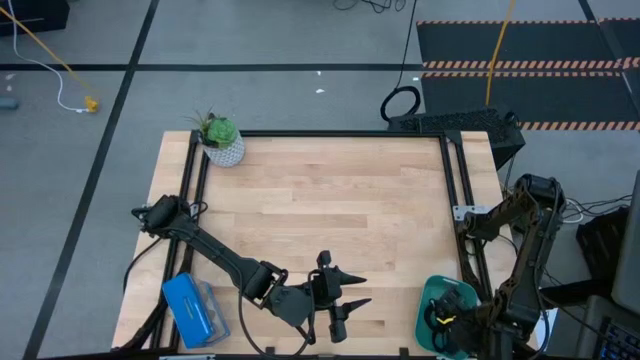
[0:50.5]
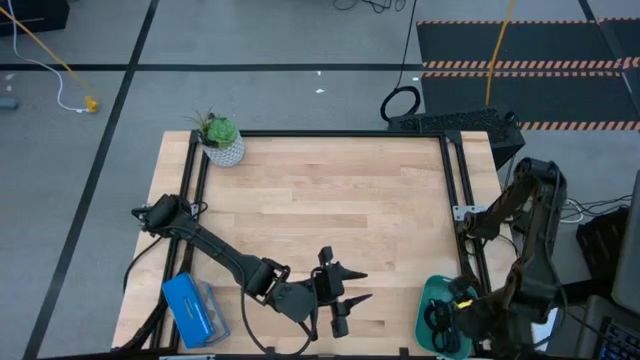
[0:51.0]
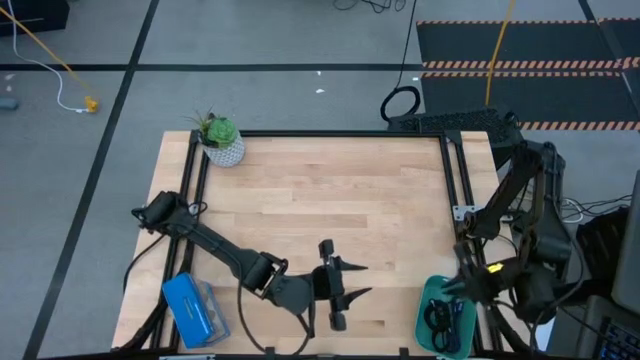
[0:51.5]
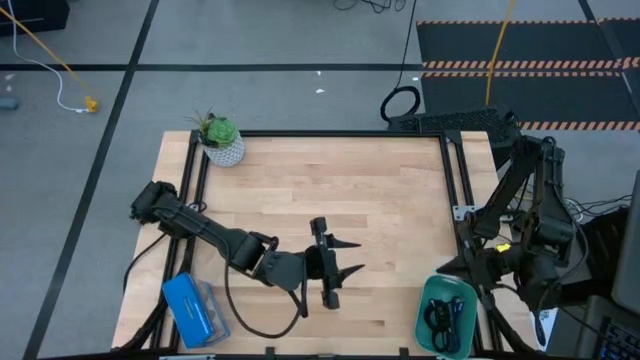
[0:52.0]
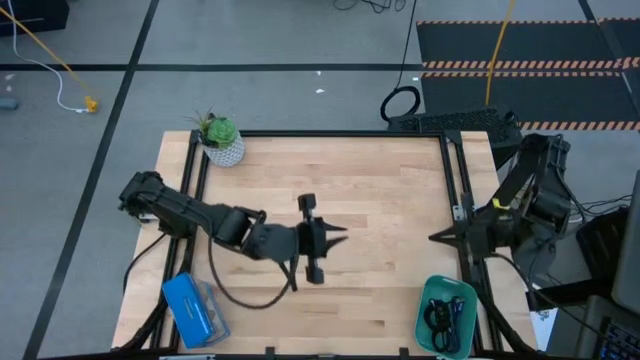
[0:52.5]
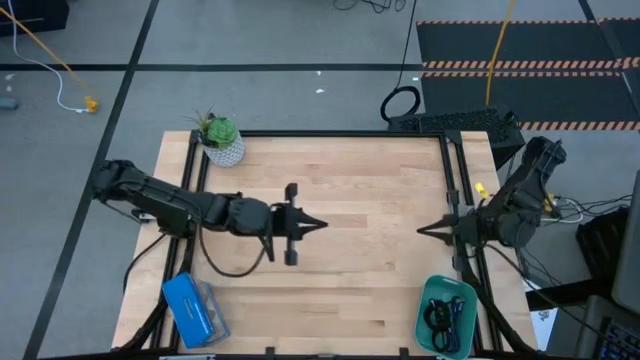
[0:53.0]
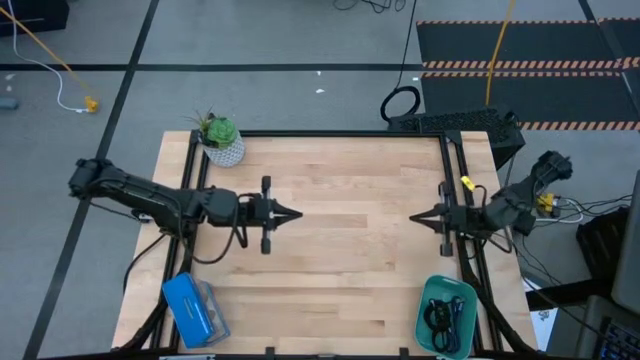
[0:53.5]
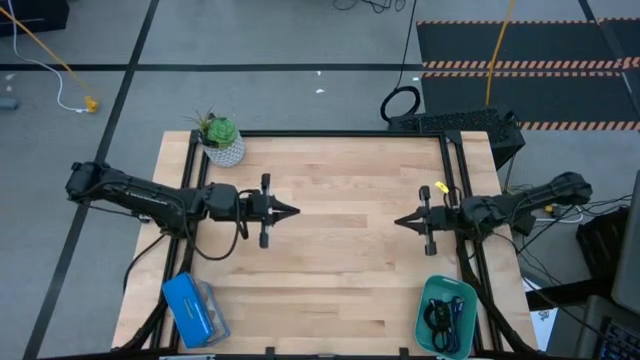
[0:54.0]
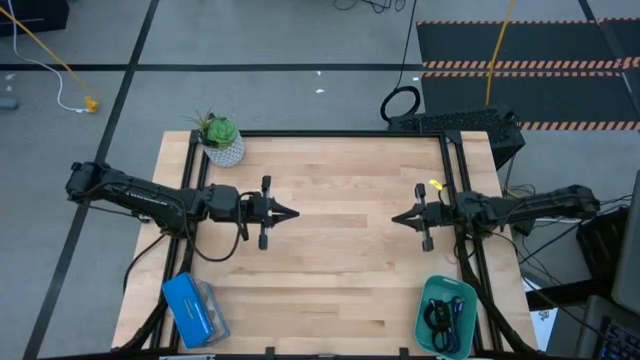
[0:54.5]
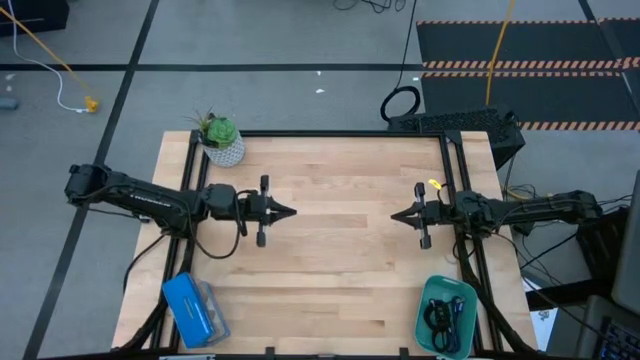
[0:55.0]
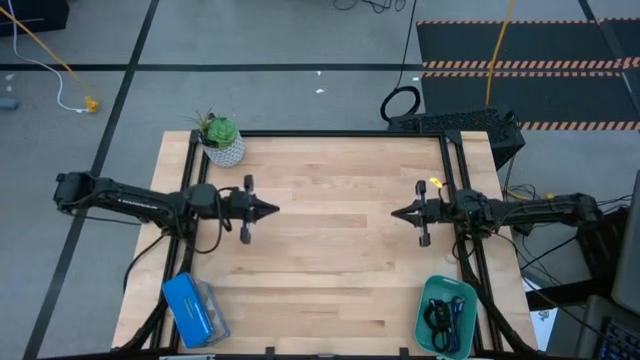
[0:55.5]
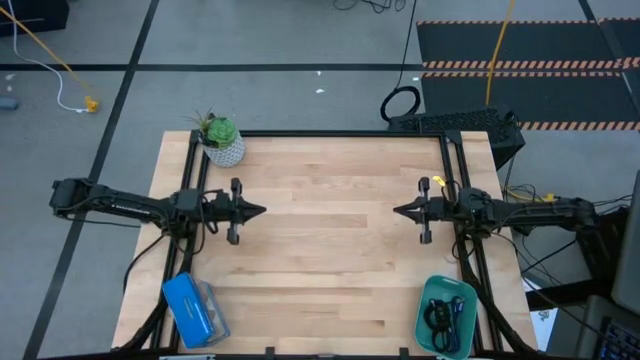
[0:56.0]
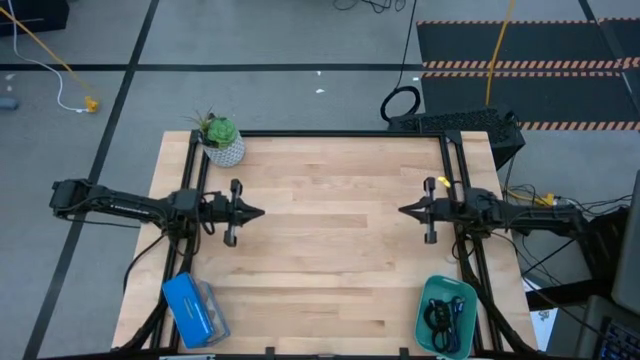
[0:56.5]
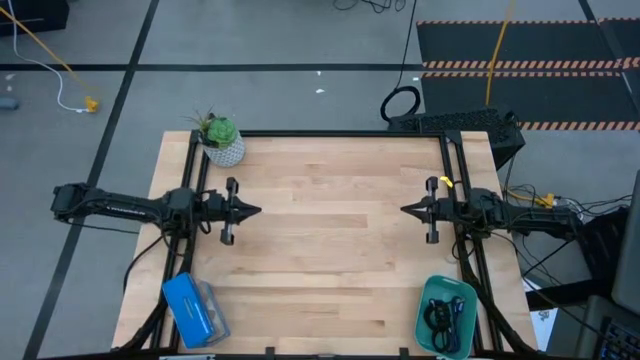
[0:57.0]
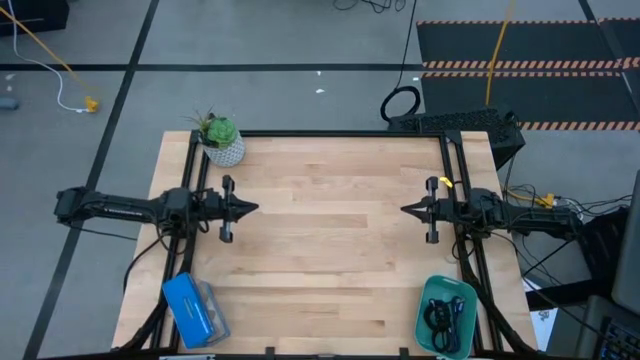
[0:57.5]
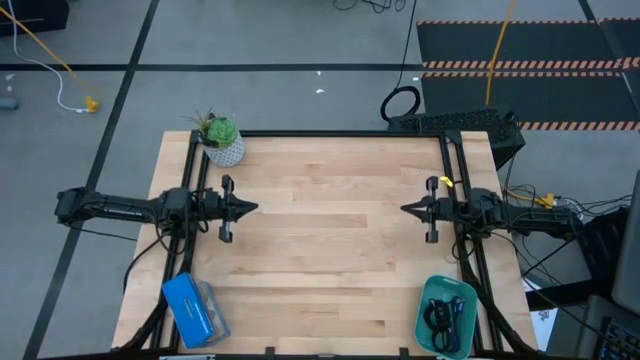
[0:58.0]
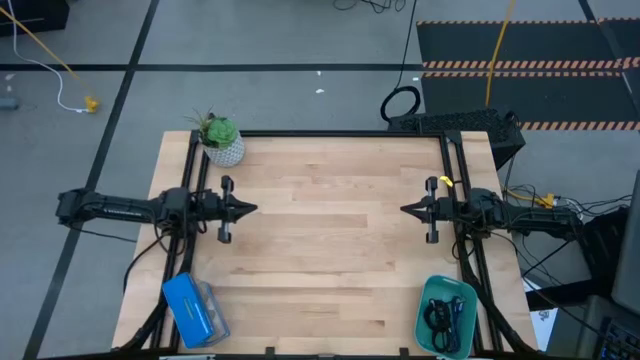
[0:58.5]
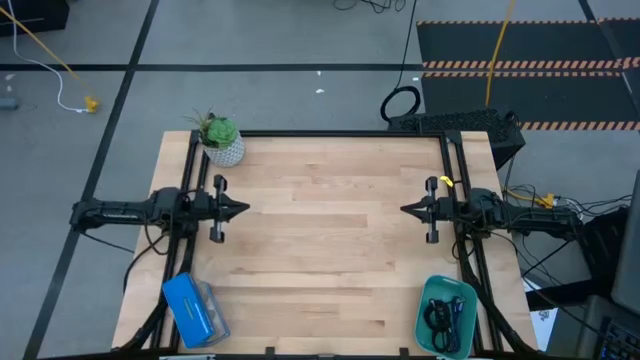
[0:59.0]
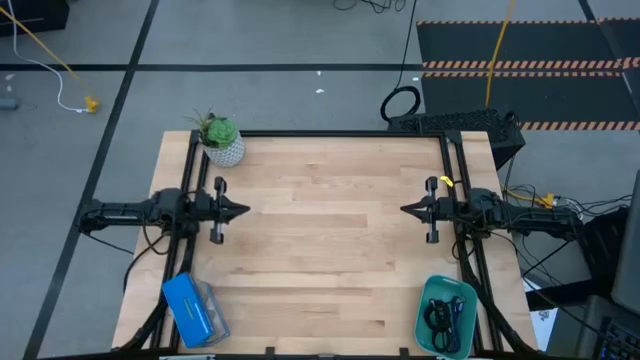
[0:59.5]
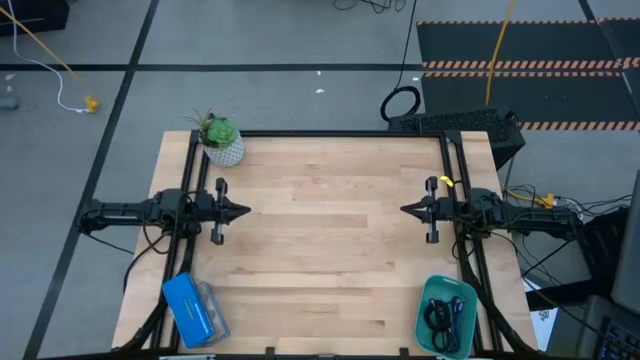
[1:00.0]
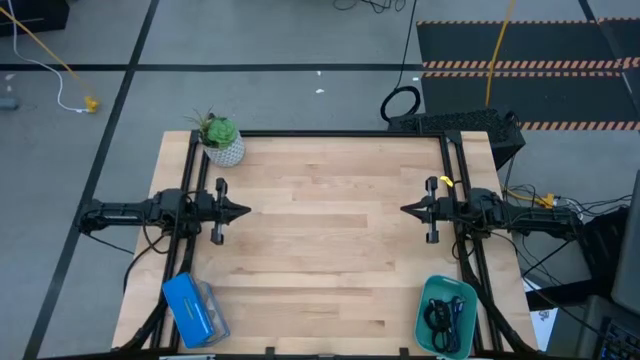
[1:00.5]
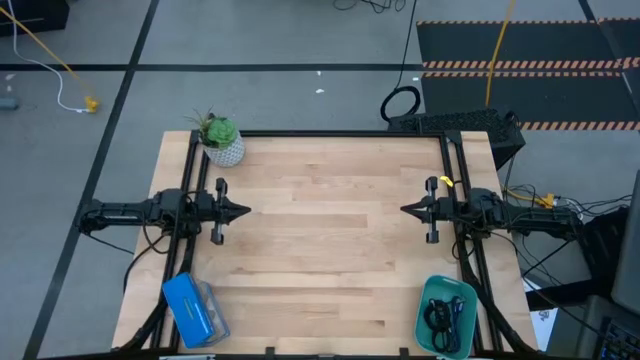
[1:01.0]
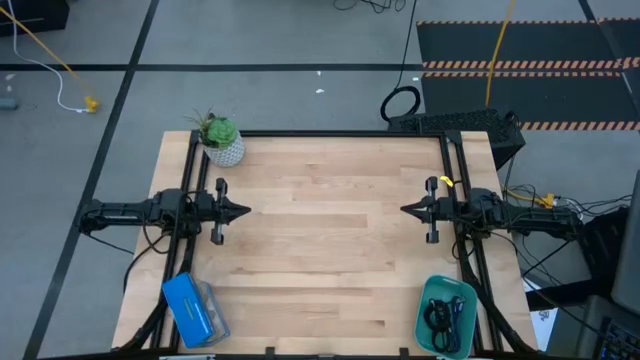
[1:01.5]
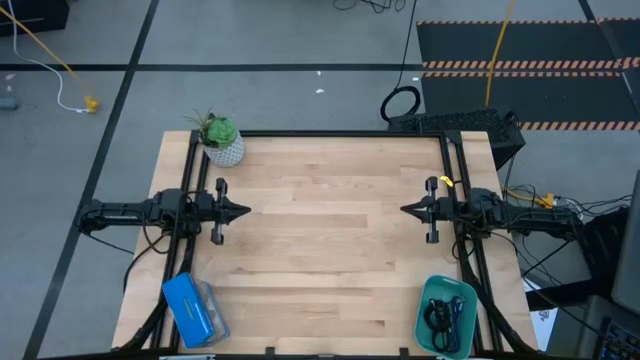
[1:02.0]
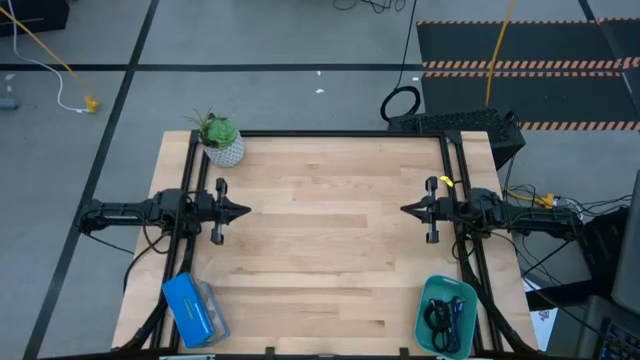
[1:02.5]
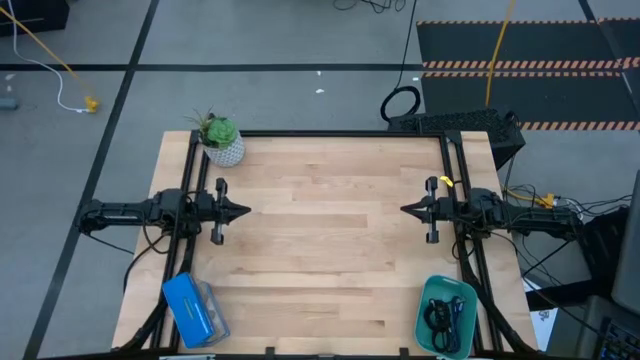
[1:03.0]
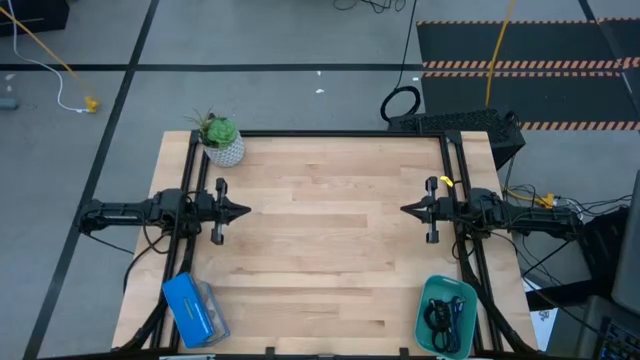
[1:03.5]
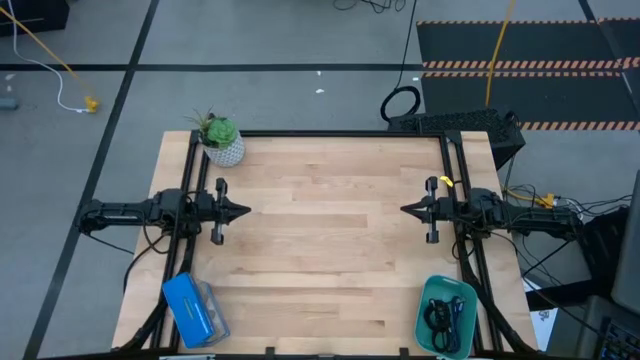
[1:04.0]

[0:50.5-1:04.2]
Task: Pick and place USB-C Cables
Return to Home Position

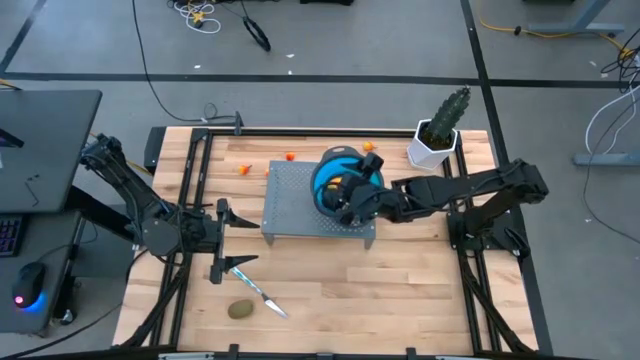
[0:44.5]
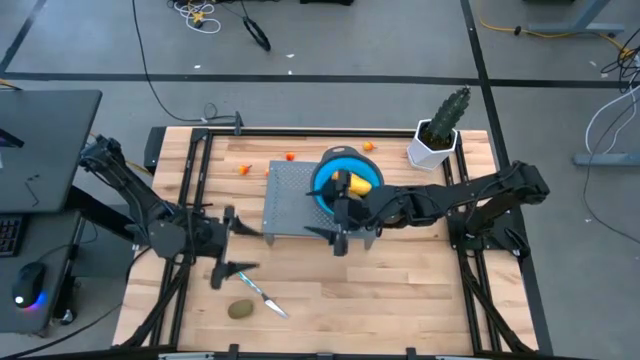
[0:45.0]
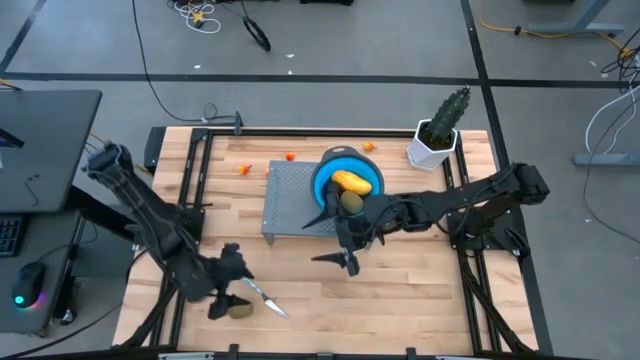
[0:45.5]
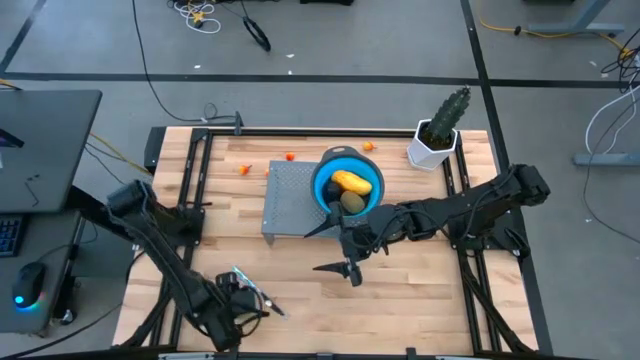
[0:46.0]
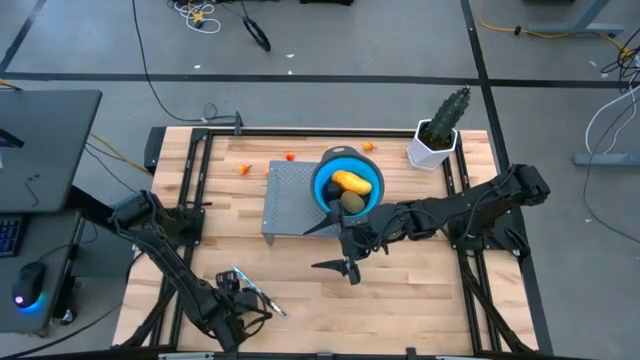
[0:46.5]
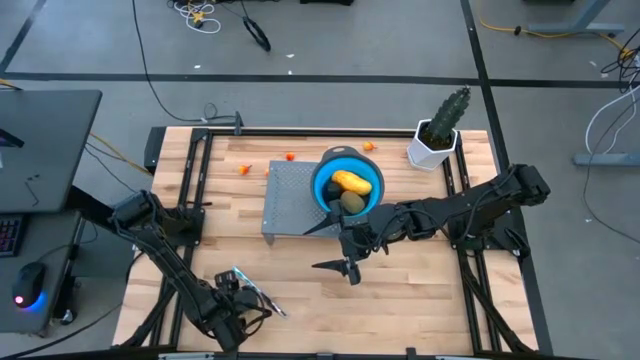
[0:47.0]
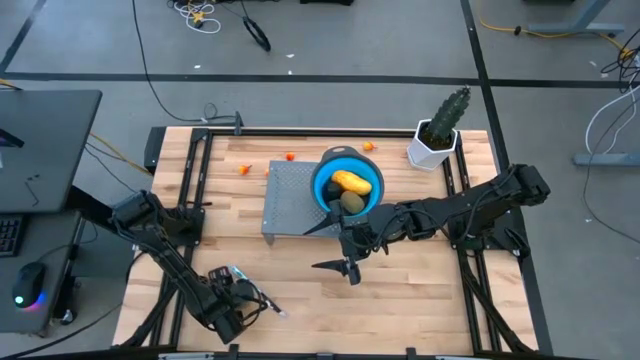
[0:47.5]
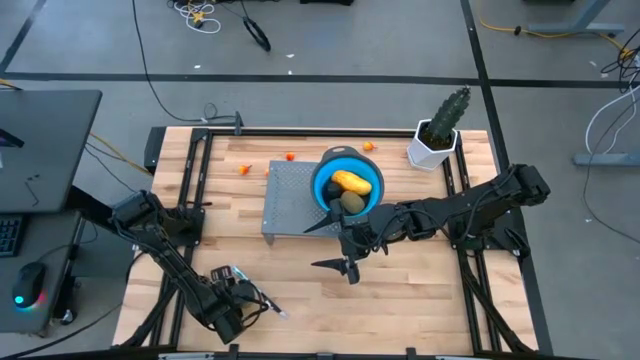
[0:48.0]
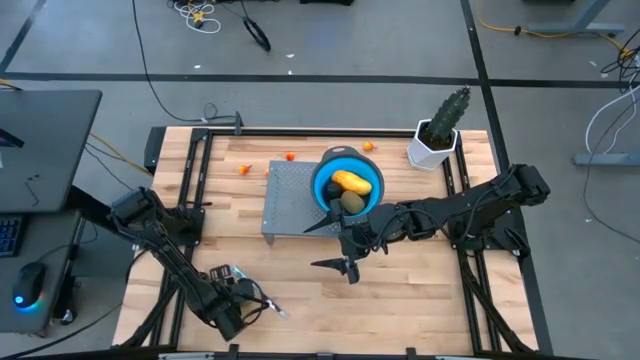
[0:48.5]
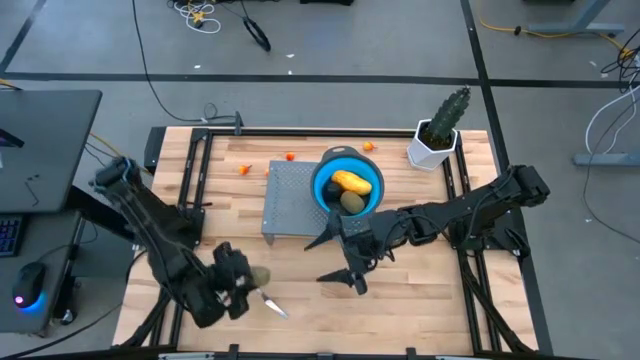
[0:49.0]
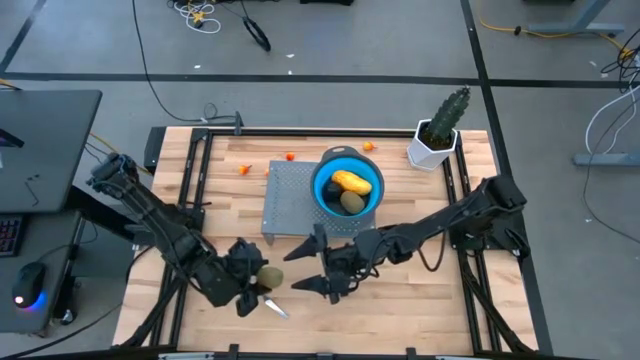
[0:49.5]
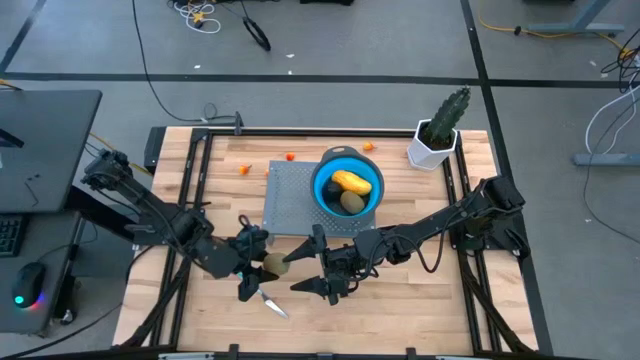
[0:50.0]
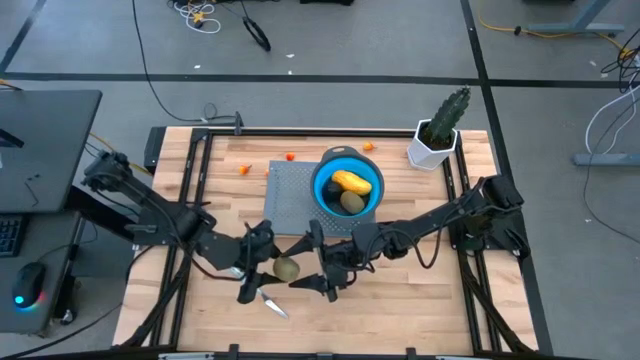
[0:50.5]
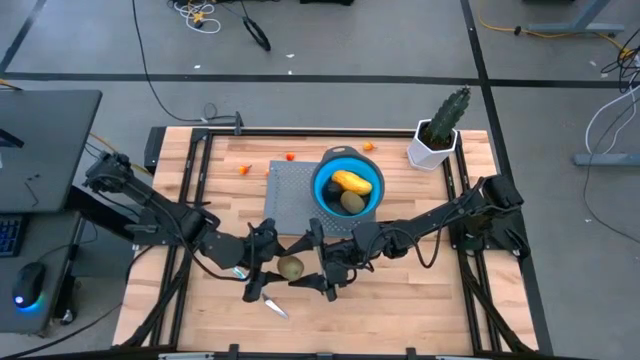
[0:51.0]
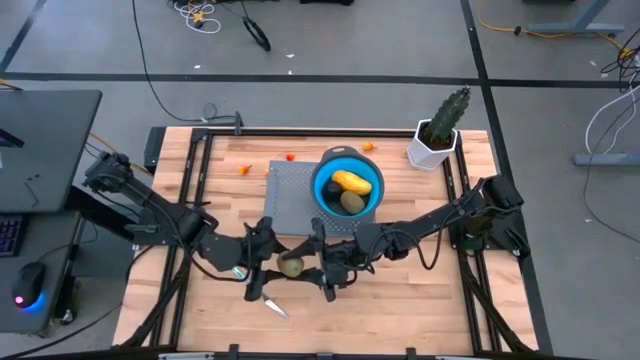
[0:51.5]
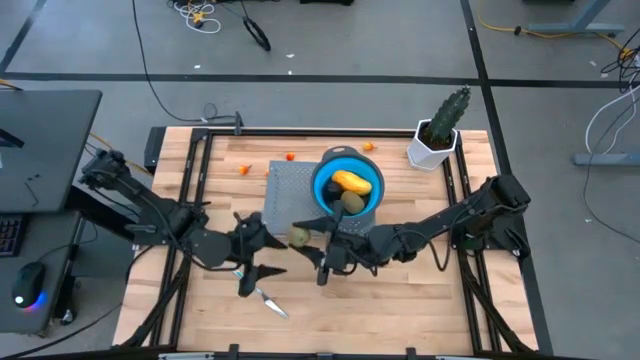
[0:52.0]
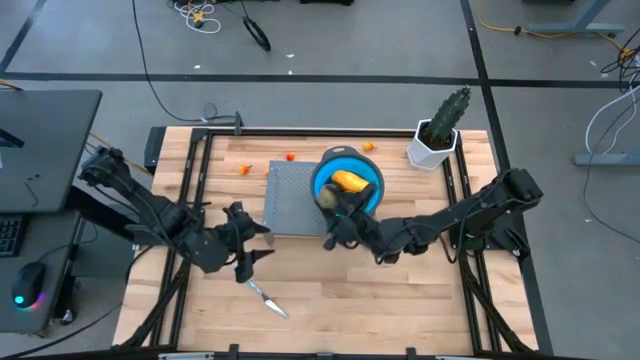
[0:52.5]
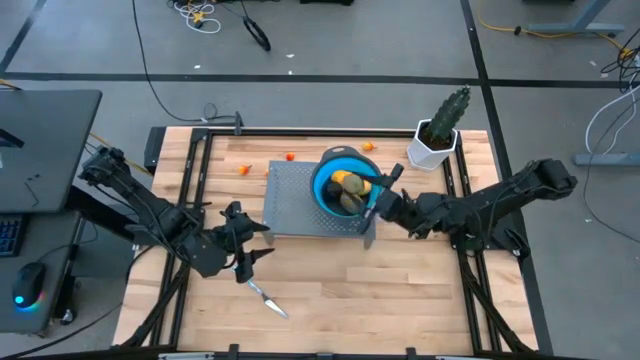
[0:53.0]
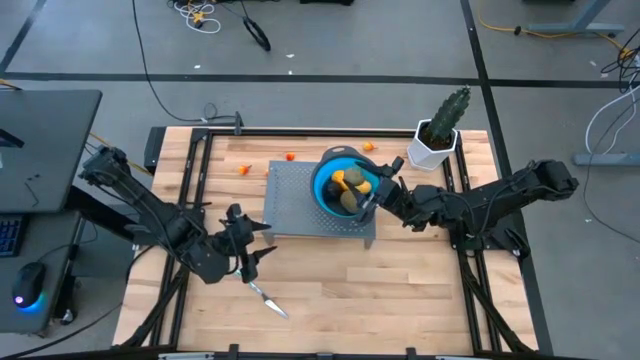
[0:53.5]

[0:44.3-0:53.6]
Task: Pick & Place Fruit
Put the brown kiwi into the blue strainer bowl on the shelf
